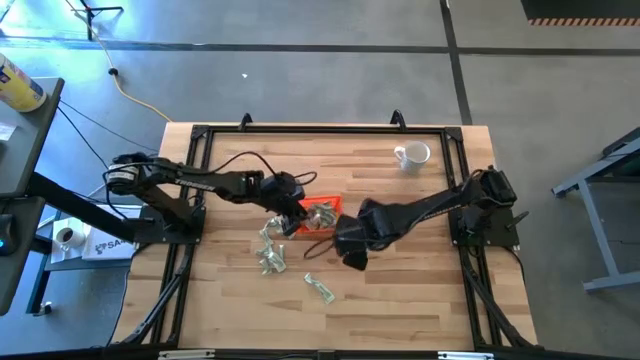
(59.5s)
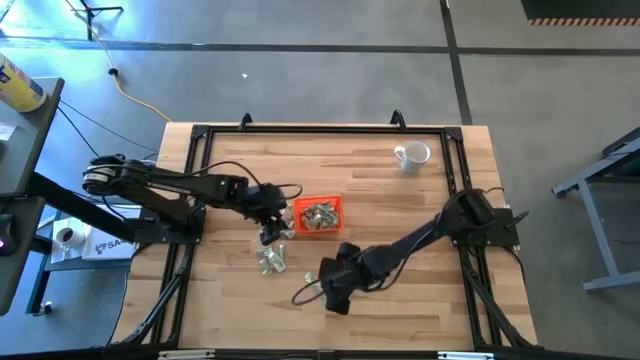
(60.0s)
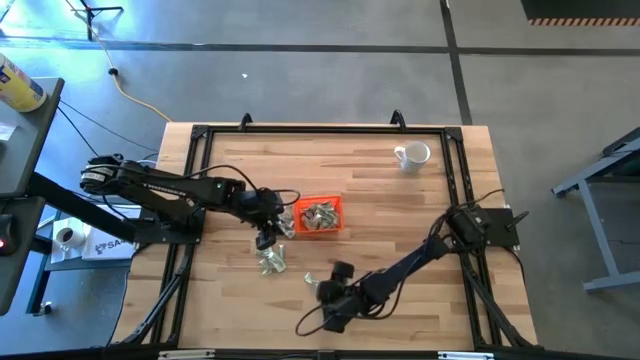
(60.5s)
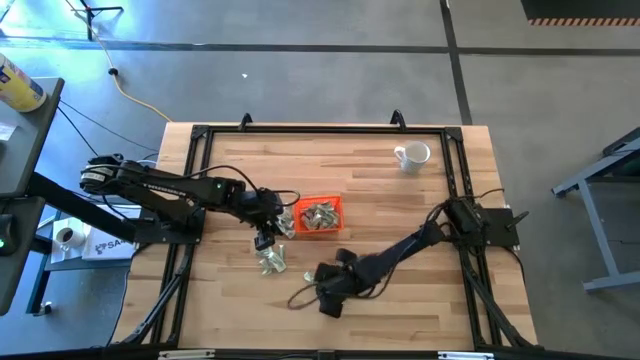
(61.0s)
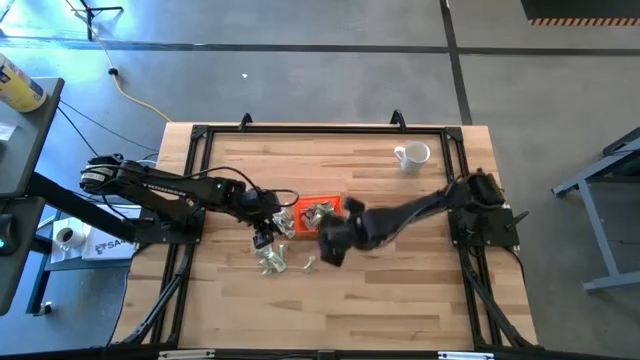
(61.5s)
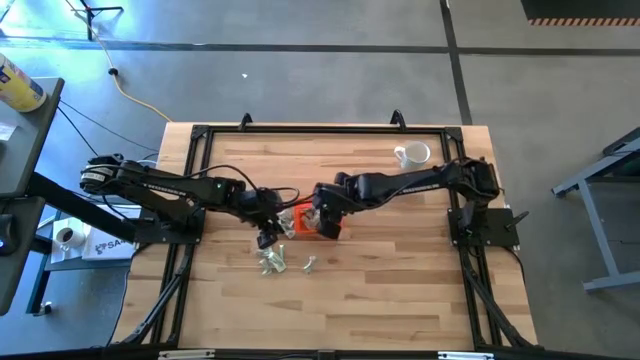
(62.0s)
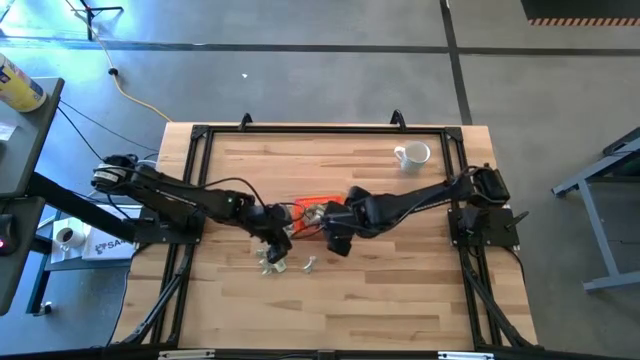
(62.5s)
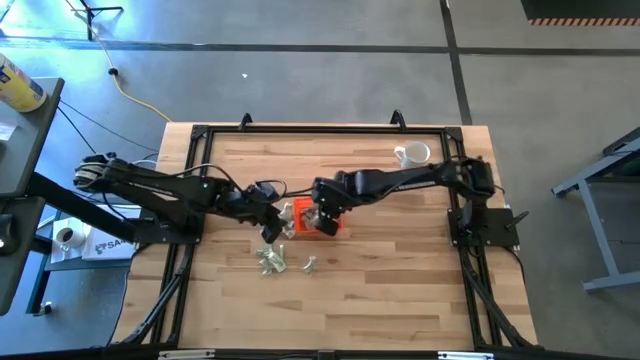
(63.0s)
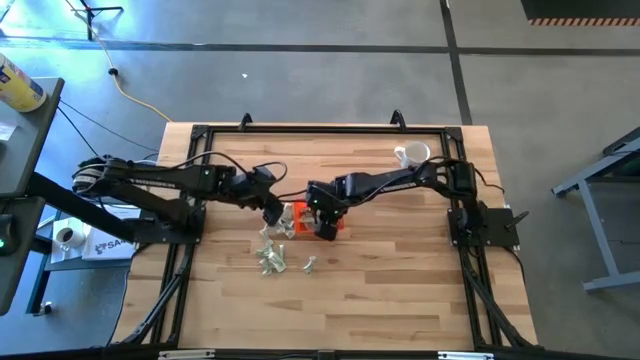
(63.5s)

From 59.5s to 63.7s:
Task: Pick and place Stevia / Truvia into bins
Put the stevia packet into the orange bin

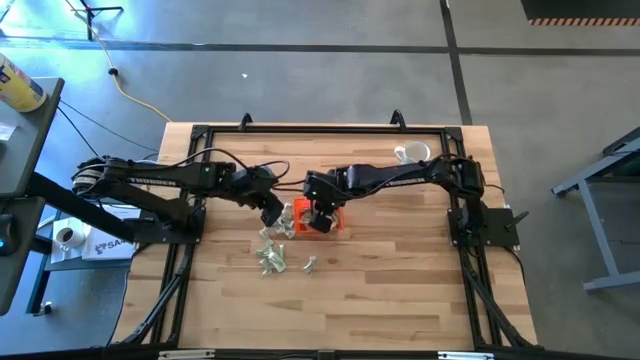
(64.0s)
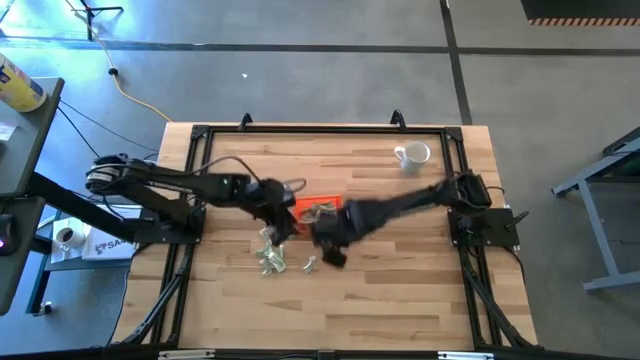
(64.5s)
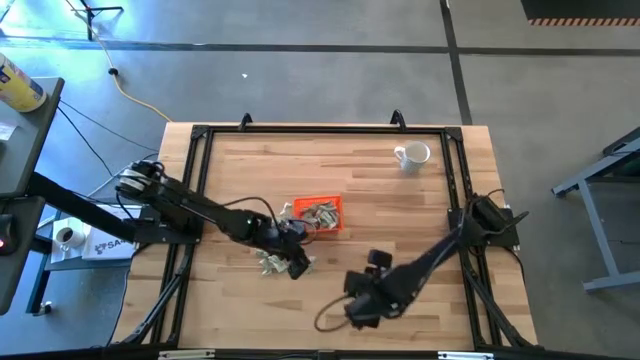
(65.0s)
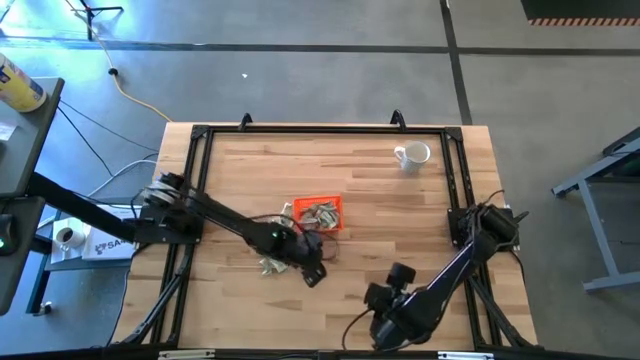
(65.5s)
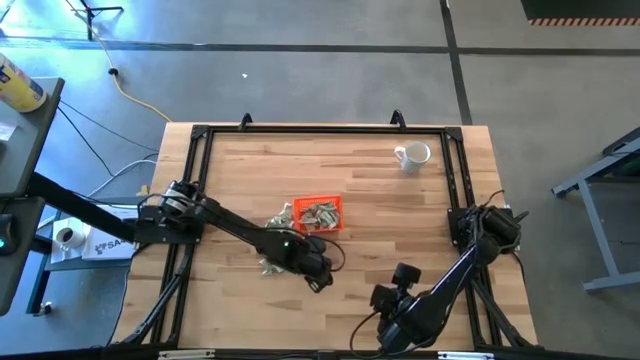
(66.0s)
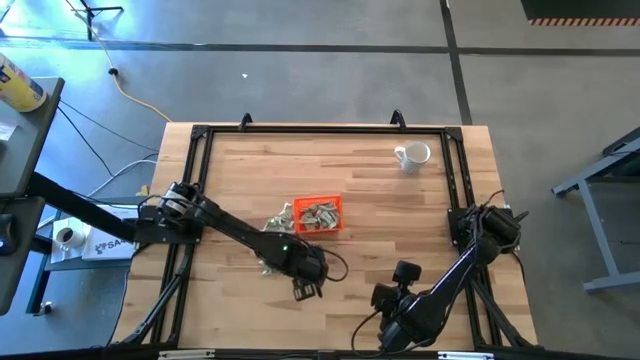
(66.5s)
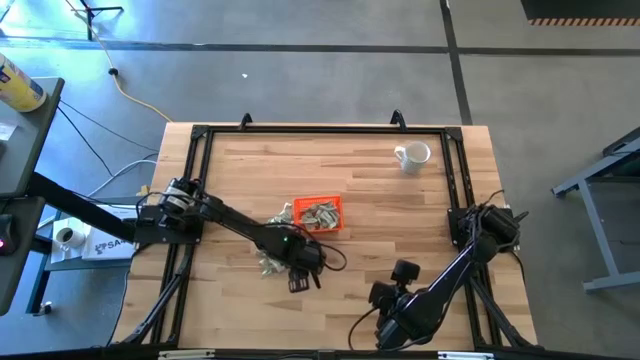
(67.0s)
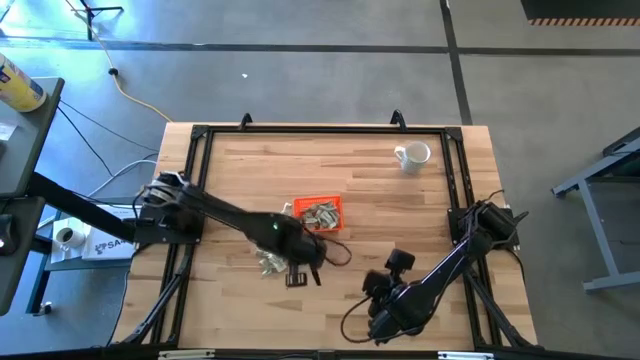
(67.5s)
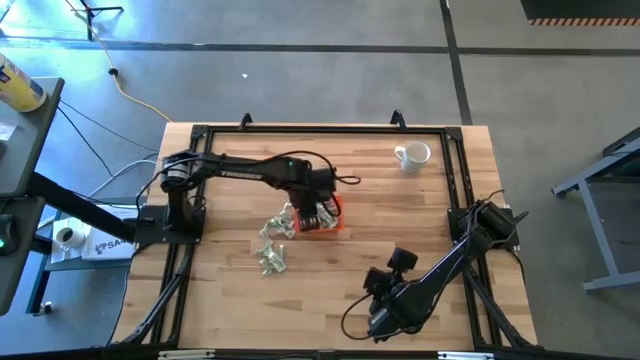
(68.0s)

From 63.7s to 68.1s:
Put the stevia packet into the orange bin

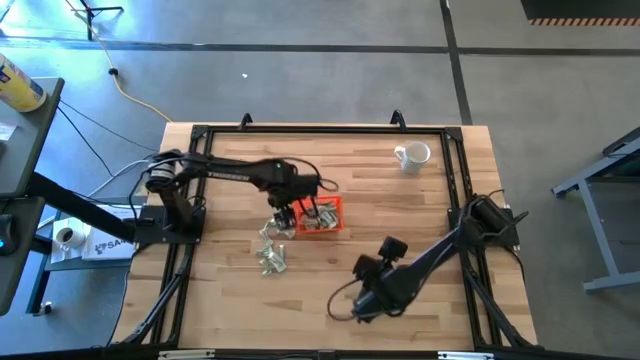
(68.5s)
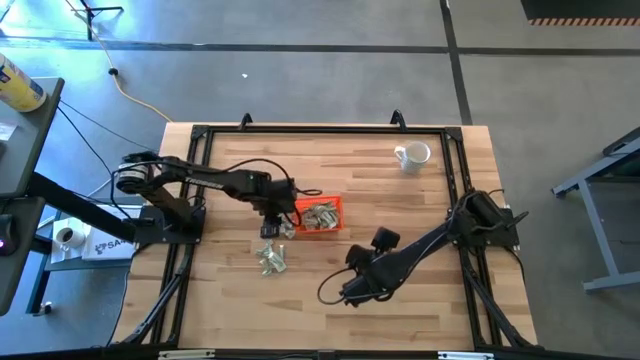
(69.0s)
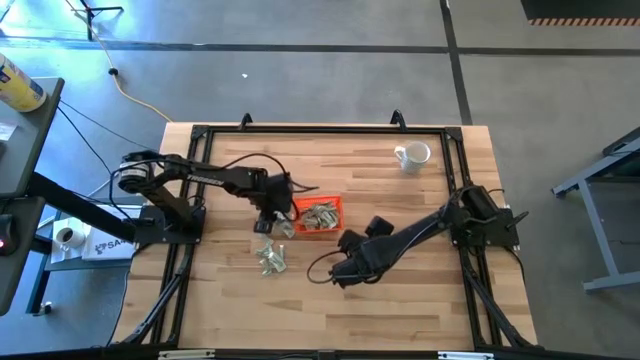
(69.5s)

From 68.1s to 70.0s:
Put the stevia packet into the orange bin

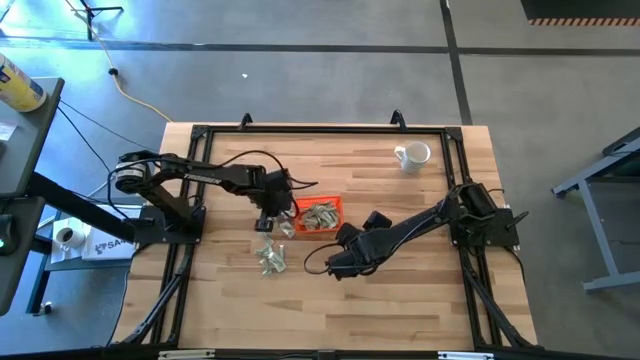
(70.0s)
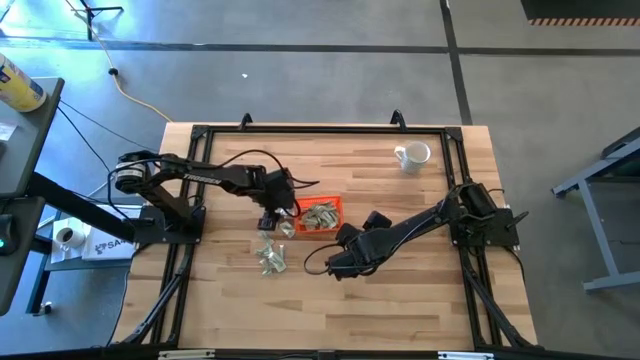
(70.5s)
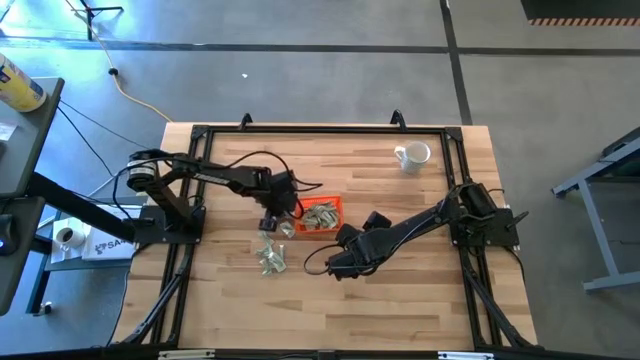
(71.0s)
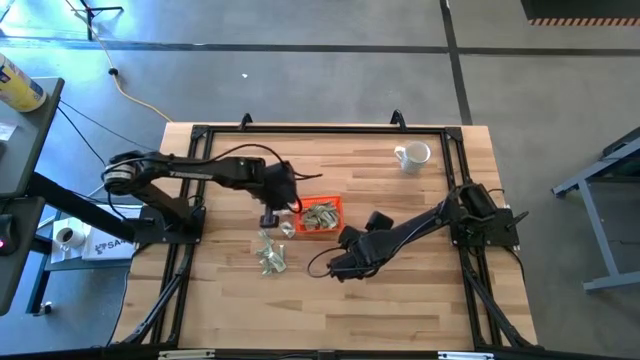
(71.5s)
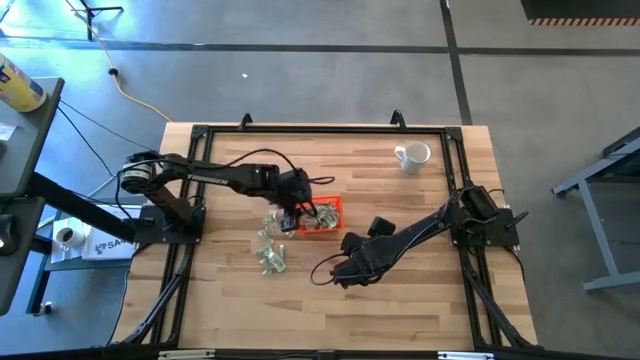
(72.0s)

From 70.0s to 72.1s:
Put the stevia packet into the orange bin

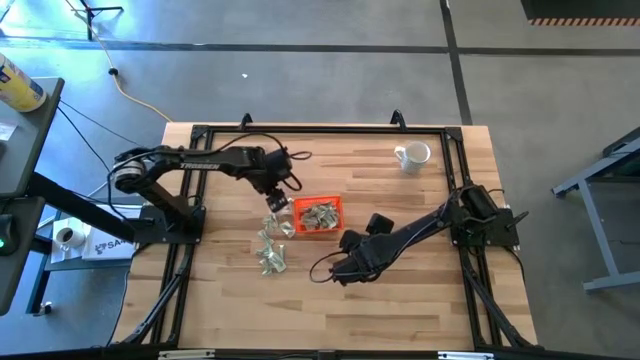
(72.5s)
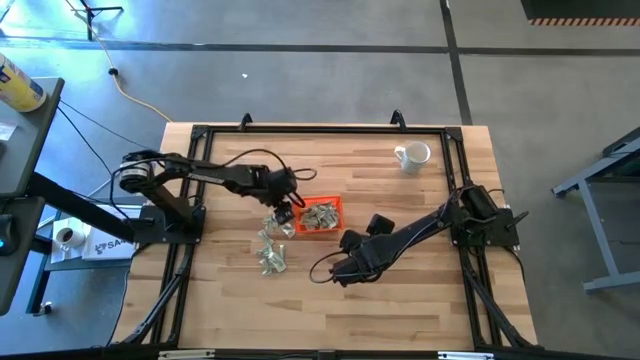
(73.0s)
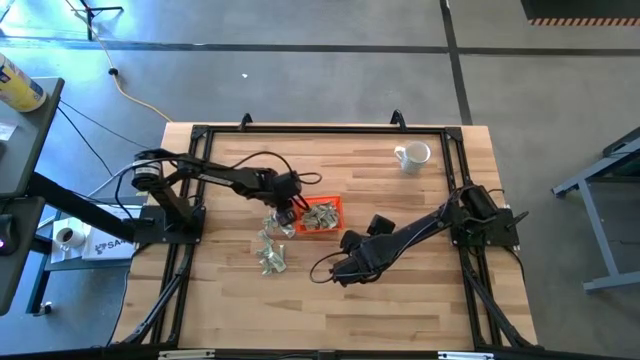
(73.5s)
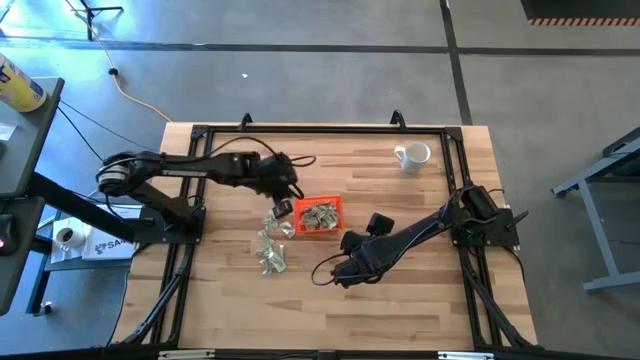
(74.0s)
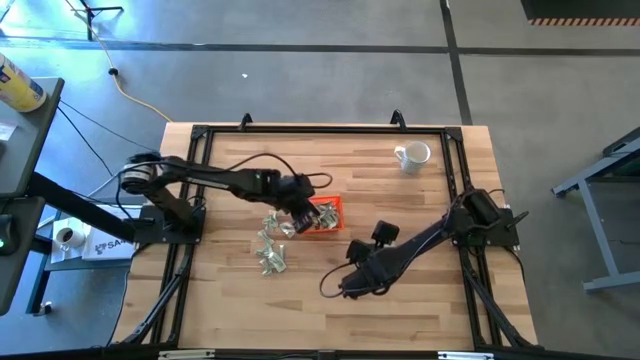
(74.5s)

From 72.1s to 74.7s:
Put the stevia packet into the orange bin

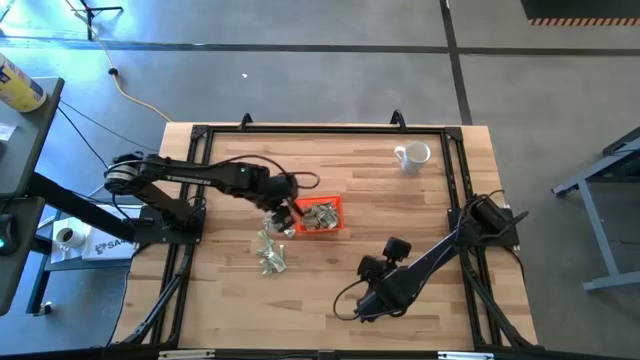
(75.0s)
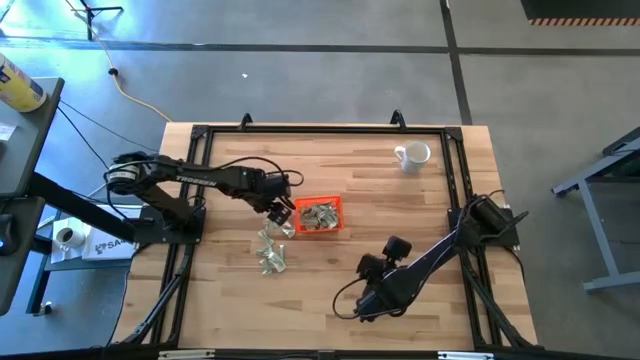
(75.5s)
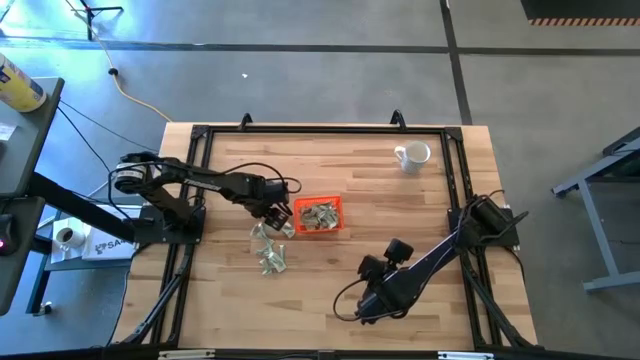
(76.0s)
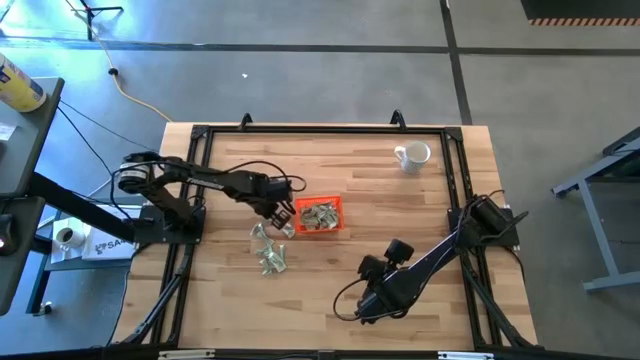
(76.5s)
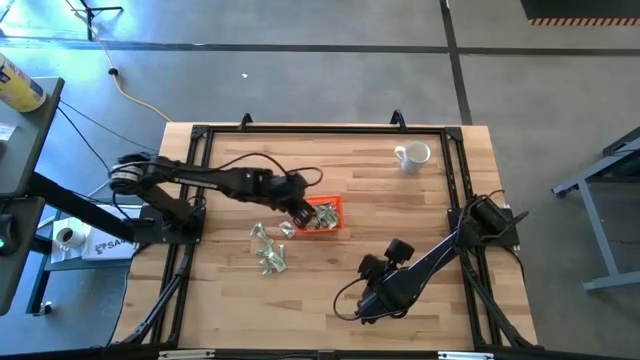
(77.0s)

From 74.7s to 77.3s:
Put the stevia packet into the orange bin

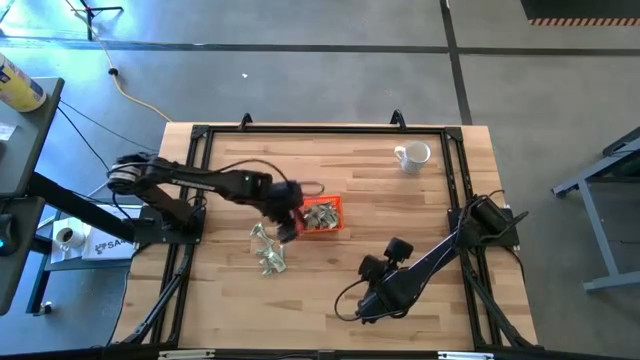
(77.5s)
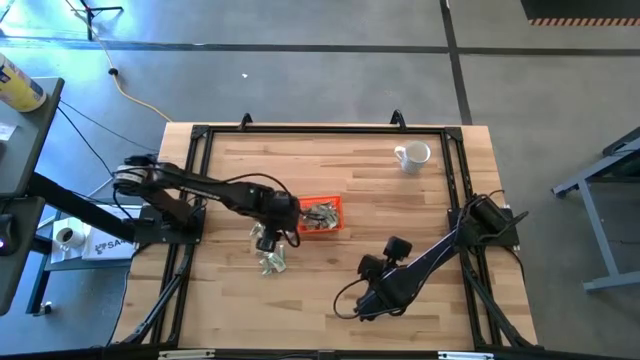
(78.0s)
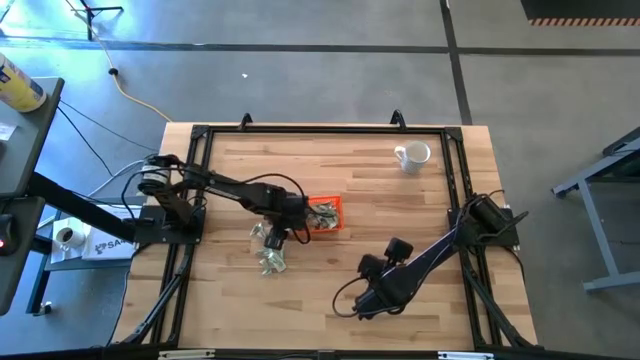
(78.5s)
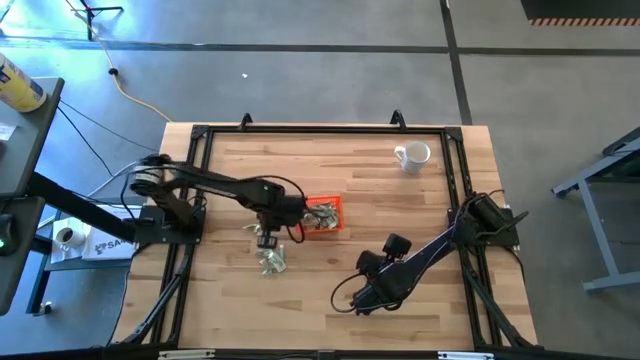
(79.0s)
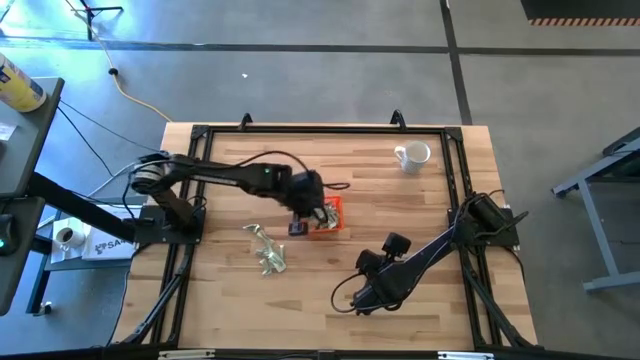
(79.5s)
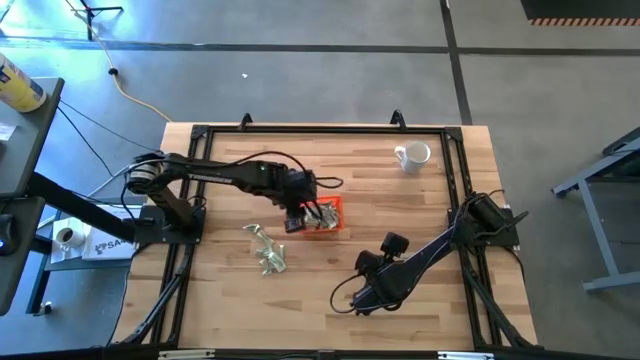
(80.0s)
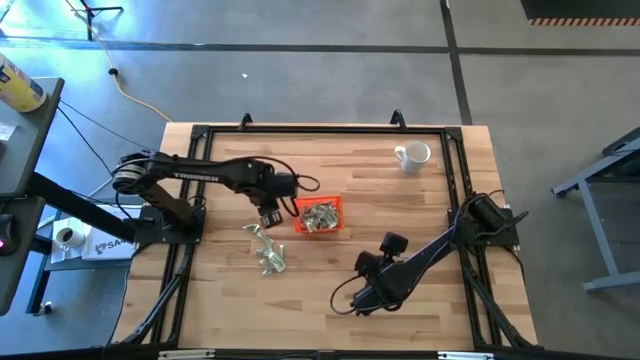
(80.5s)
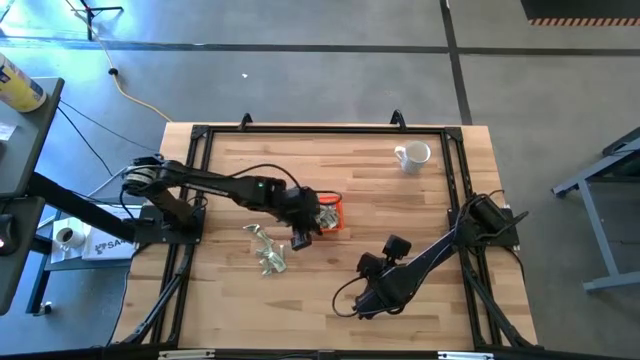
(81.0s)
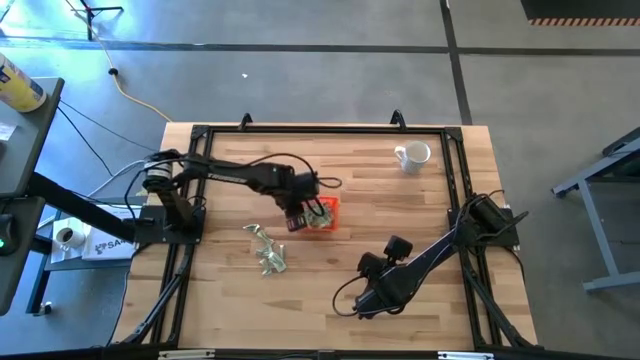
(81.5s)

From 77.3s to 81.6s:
Put the stevia packet into the orange bin
